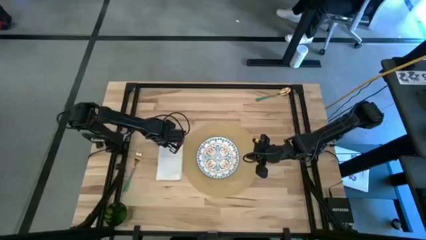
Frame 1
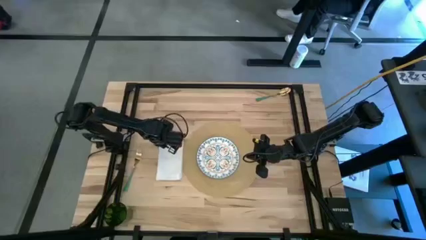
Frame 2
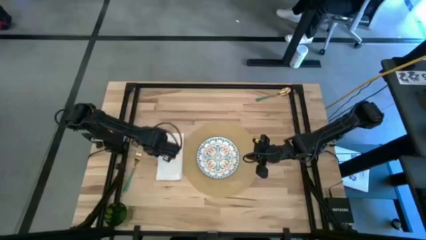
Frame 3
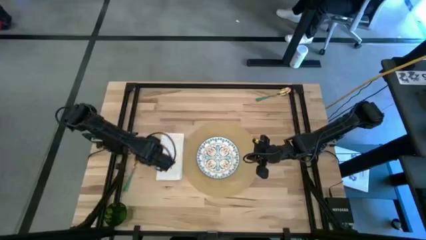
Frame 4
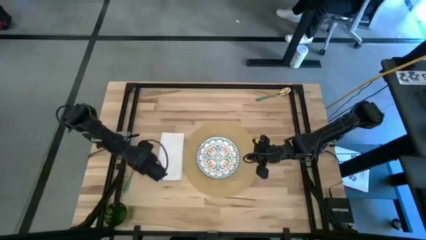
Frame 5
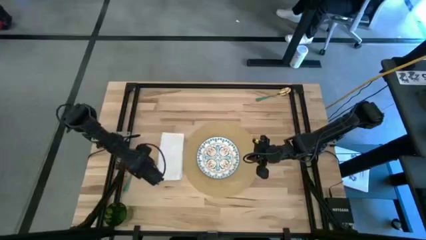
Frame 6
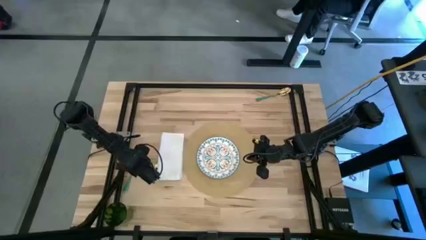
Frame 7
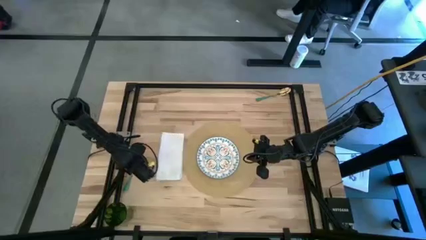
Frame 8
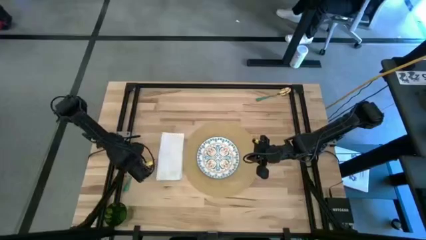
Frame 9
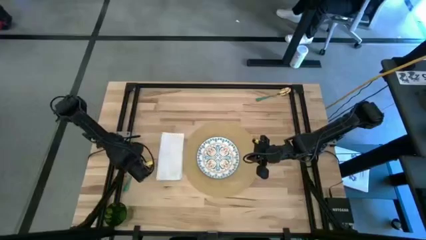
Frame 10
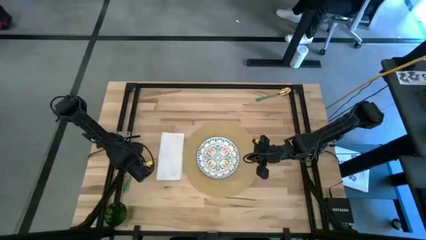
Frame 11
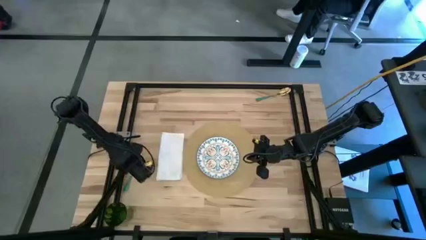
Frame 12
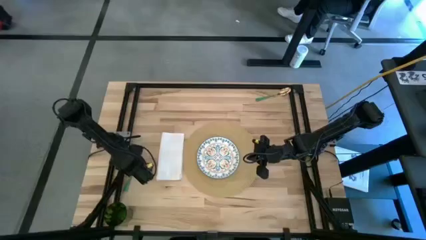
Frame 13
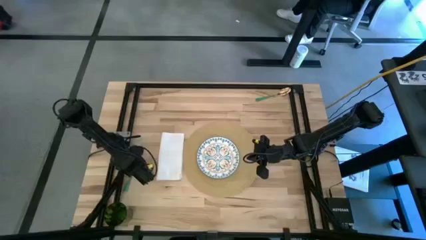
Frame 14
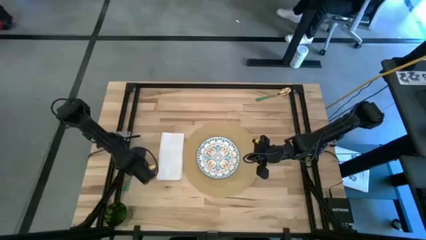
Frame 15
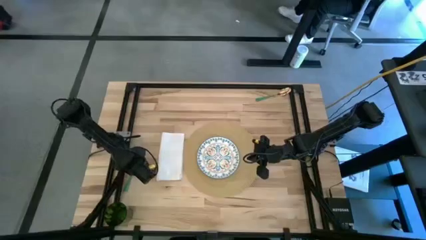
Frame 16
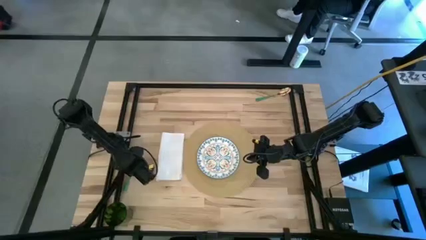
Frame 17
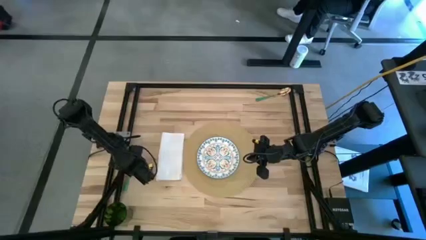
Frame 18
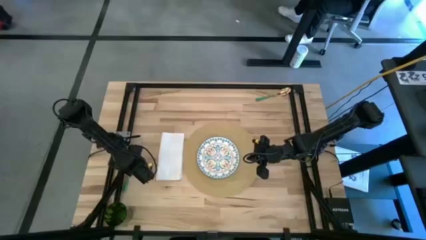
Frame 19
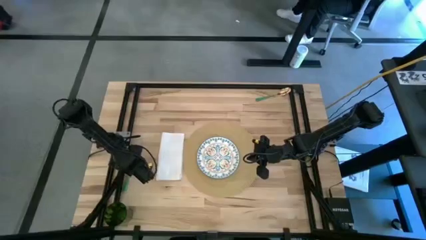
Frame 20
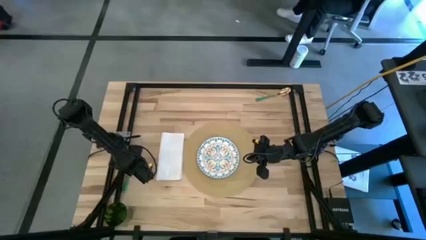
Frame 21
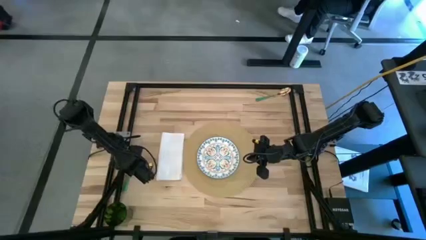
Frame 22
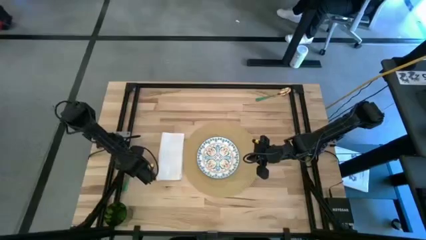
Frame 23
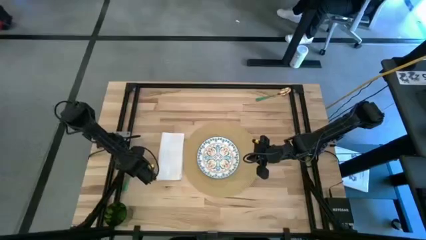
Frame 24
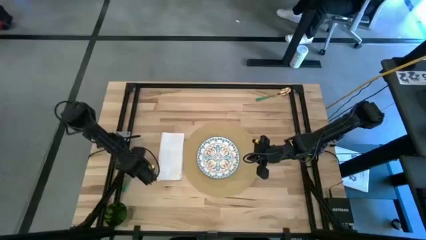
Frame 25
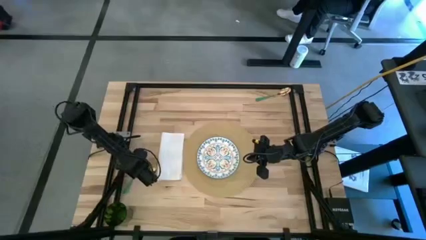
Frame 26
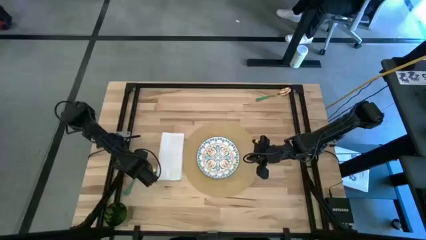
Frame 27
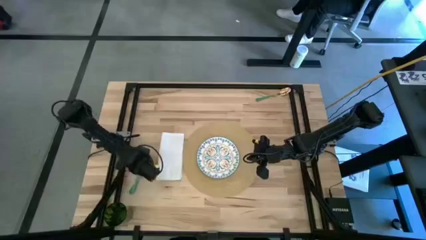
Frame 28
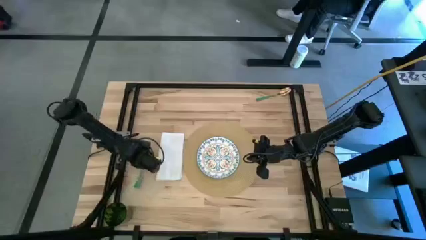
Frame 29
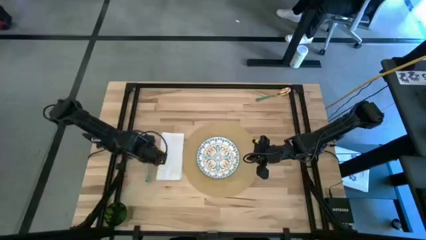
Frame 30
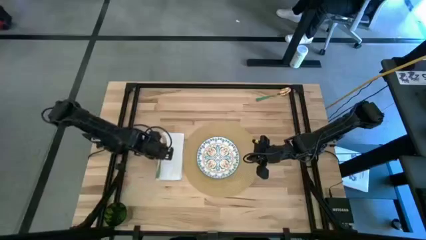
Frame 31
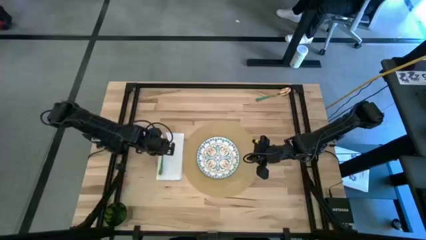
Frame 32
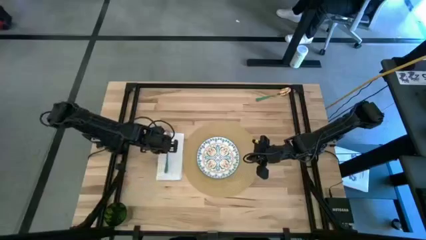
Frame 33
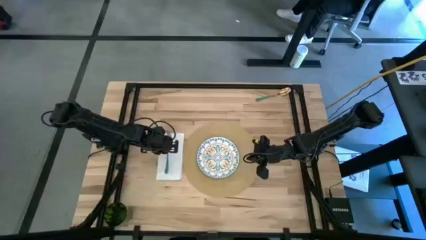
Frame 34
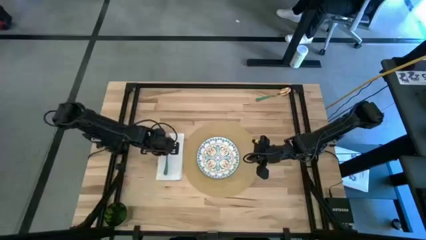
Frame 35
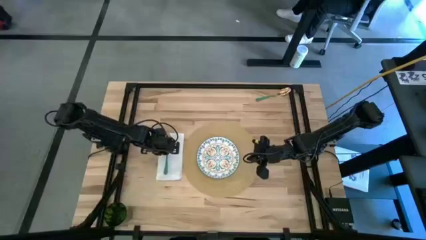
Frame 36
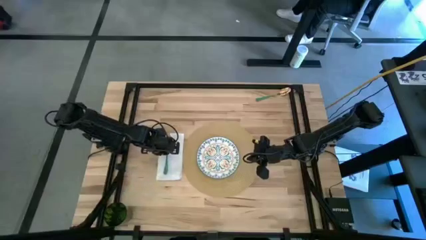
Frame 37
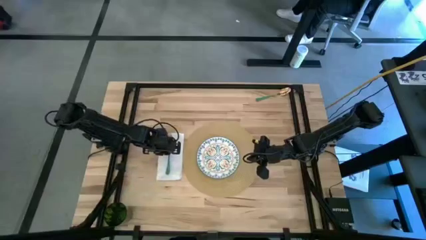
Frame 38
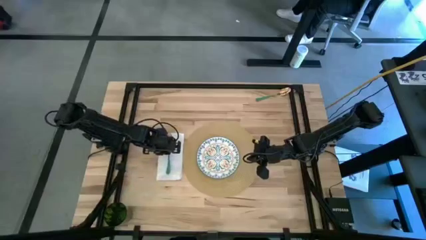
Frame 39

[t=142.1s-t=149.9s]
Task: Set table place
Put the green fork on top of the white table napkin

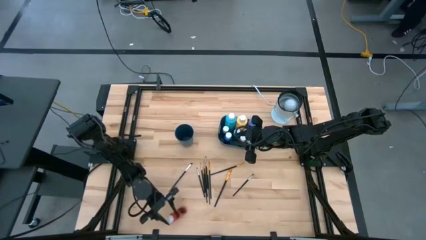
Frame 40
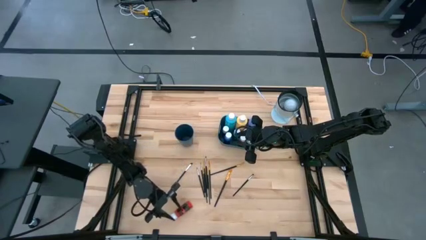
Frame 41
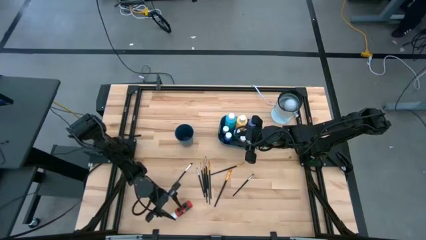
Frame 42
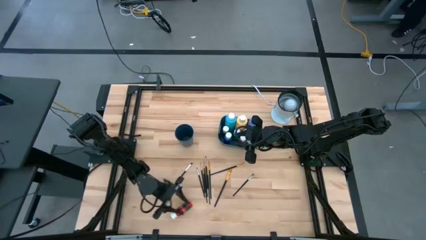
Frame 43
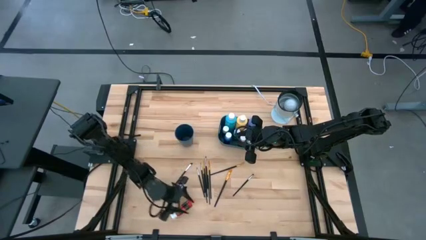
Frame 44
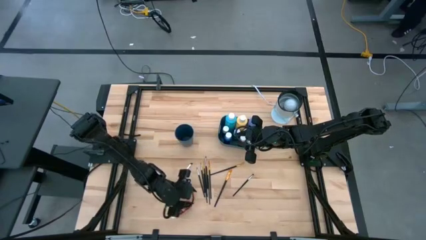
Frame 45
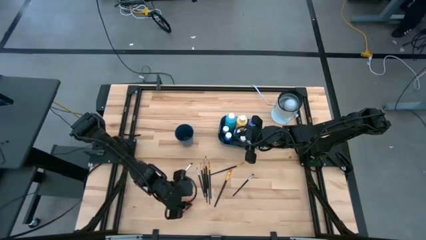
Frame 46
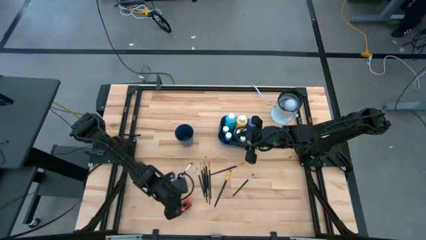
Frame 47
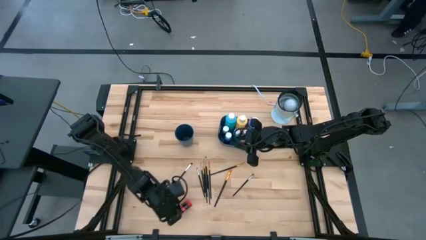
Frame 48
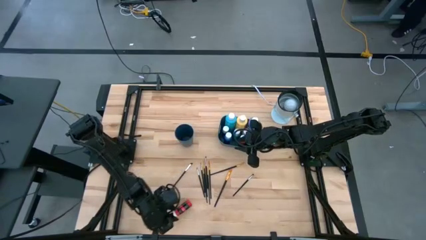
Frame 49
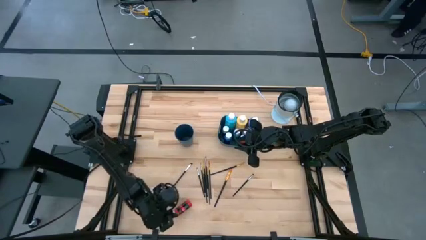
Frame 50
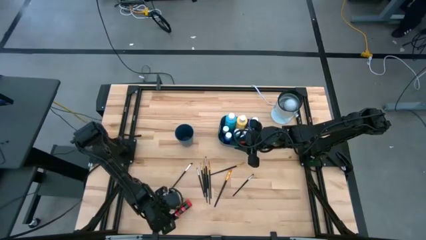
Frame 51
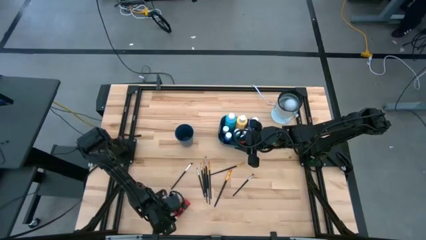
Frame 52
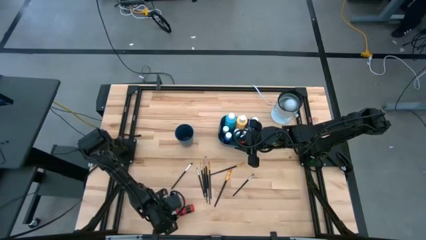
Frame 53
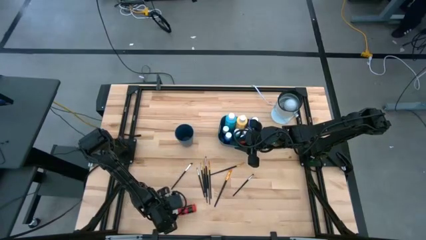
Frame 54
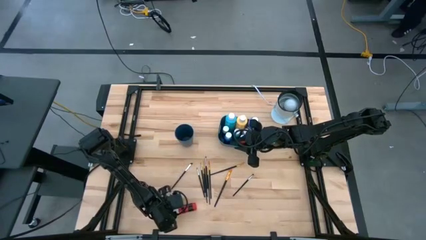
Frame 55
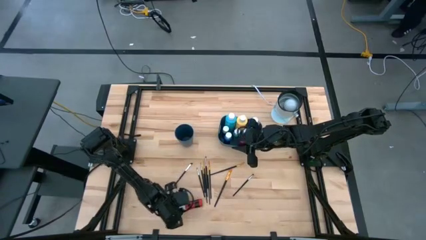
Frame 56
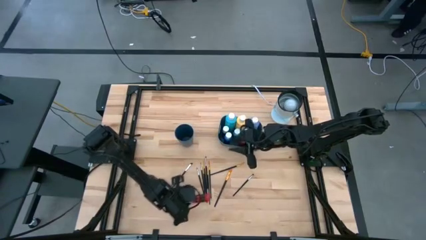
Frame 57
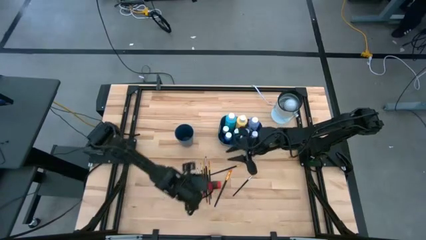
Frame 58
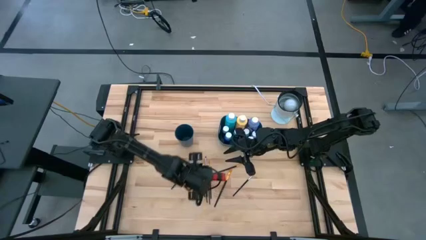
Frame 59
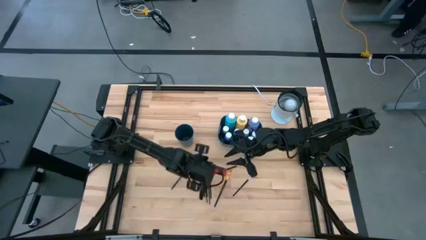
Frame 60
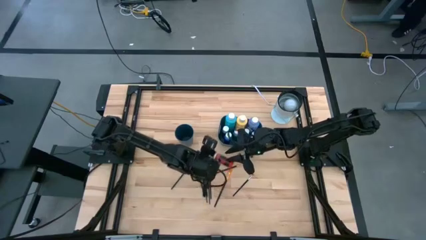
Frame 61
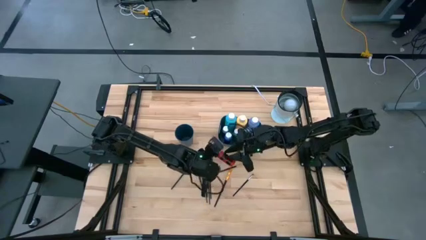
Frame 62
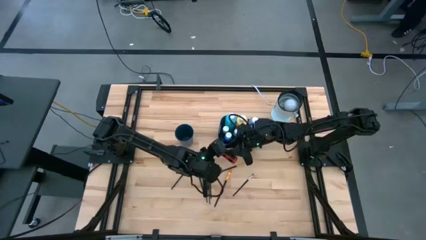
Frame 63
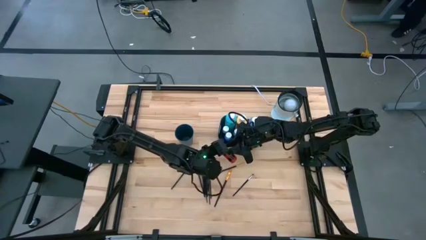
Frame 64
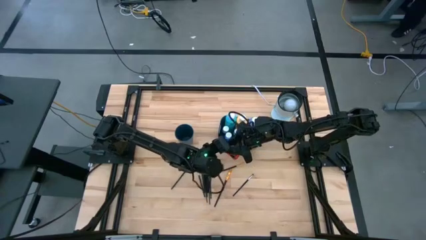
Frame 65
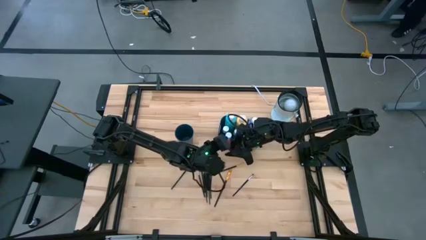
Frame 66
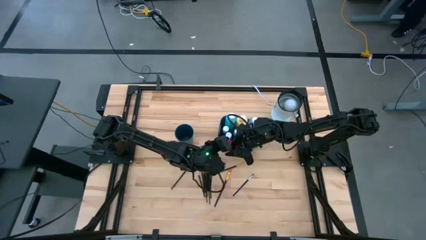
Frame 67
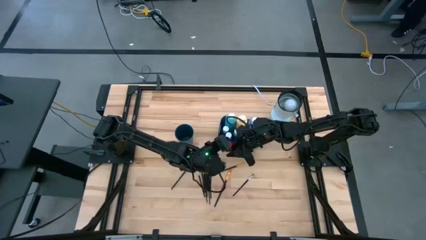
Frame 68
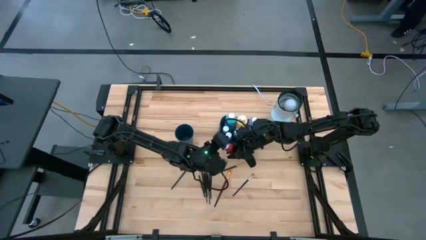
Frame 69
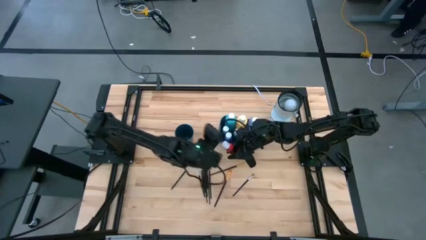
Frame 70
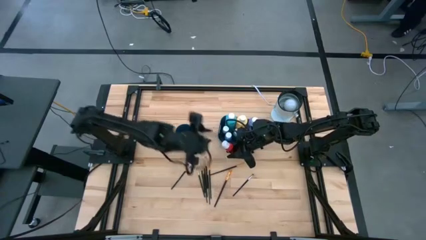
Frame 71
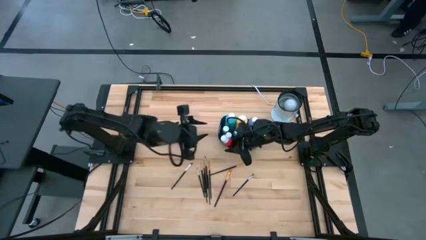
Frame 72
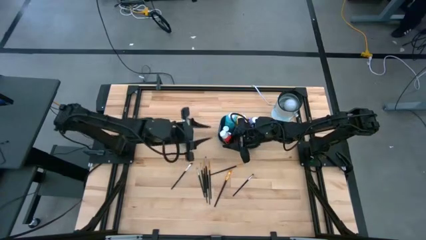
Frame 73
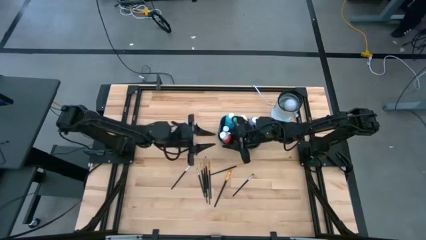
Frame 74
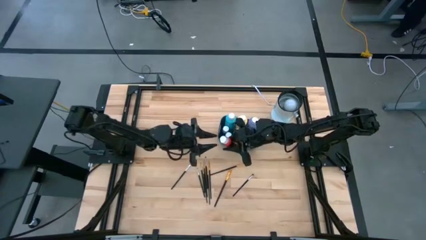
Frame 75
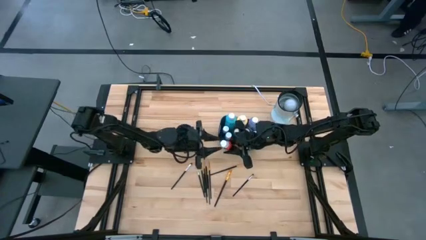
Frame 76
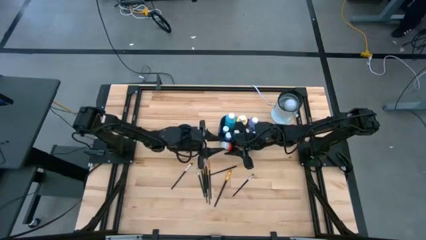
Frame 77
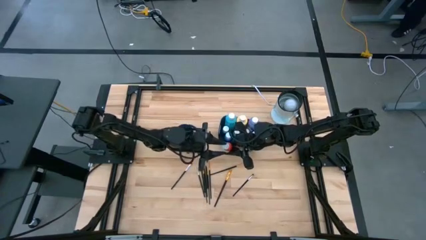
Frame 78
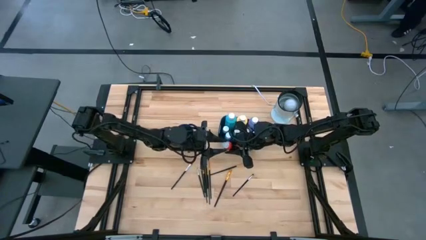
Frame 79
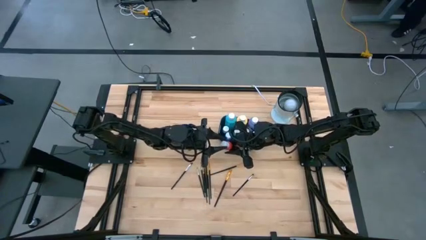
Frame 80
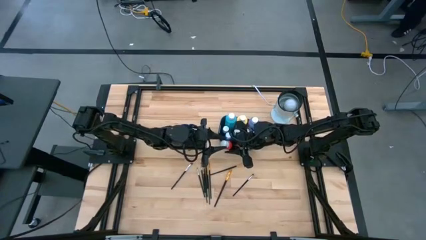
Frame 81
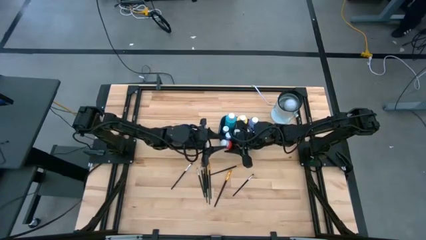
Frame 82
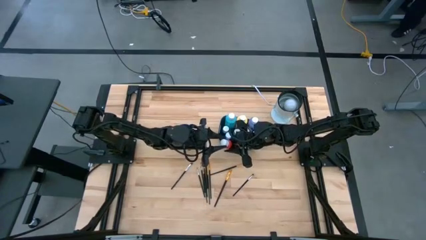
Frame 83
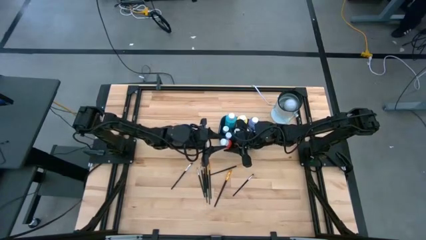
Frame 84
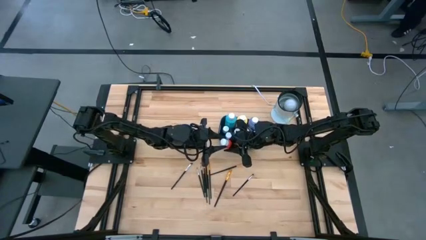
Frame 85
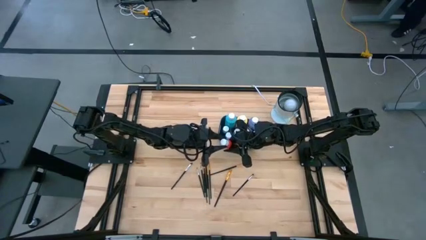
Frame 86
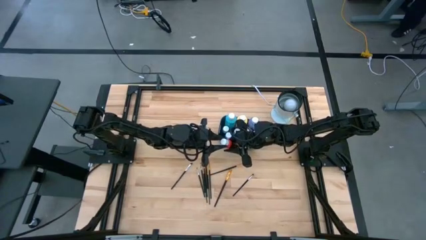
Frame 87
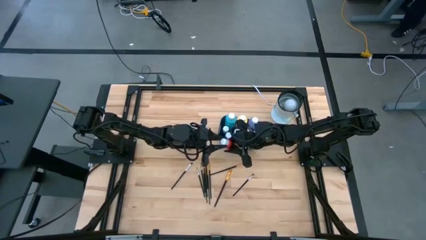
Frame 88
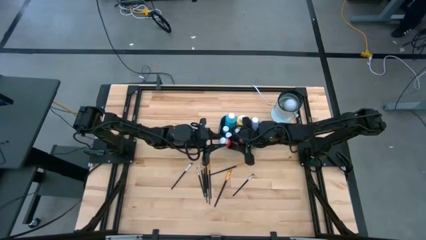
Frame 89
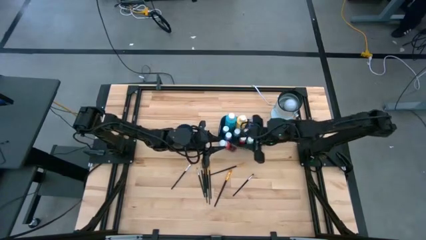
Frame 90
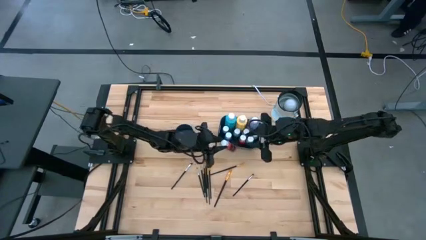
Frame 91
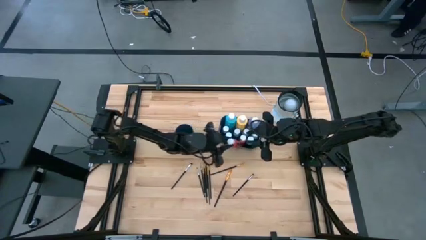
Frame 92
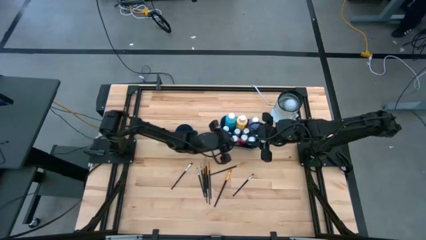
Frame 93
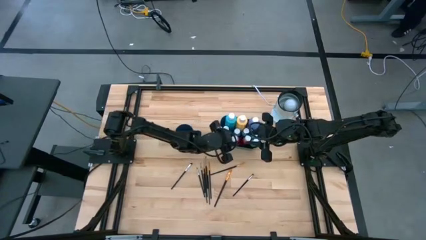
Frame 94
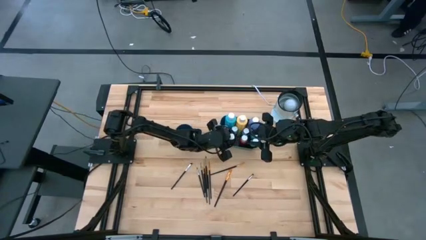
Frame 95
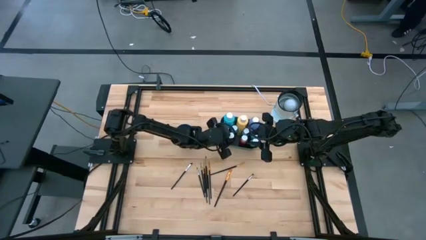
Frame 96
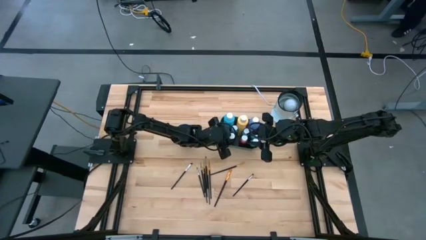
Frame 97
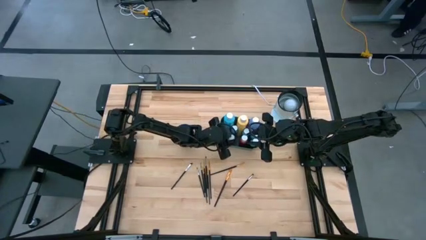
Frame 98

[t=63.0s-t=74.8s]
Task: Pick & Place Paint Supplies
Put the small red paint bottle into the blue bin
